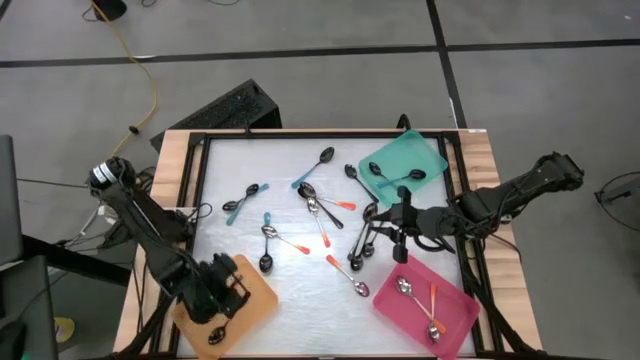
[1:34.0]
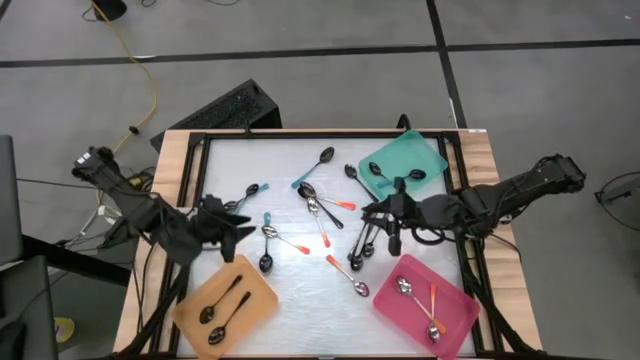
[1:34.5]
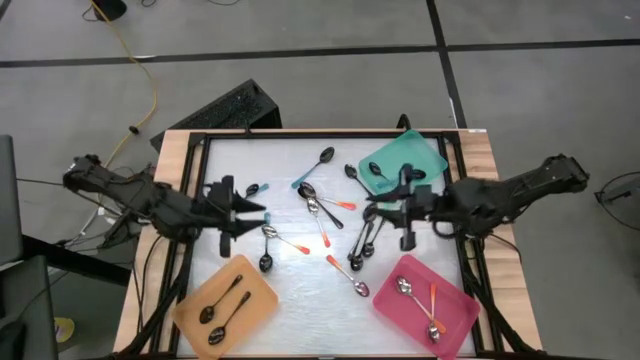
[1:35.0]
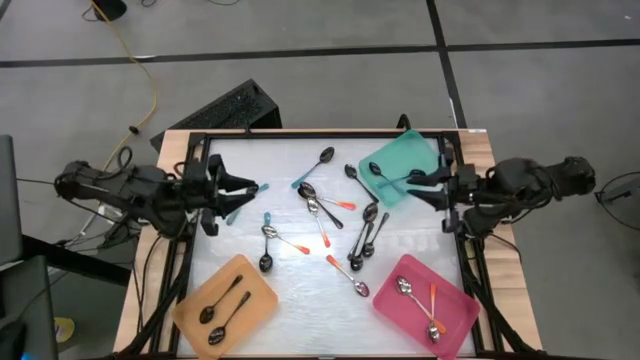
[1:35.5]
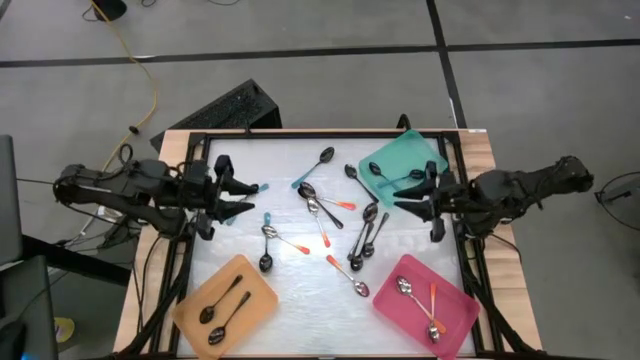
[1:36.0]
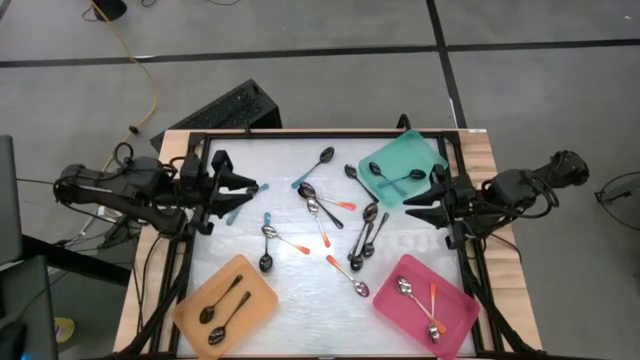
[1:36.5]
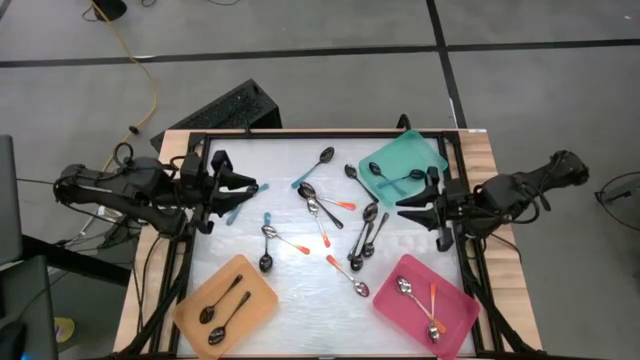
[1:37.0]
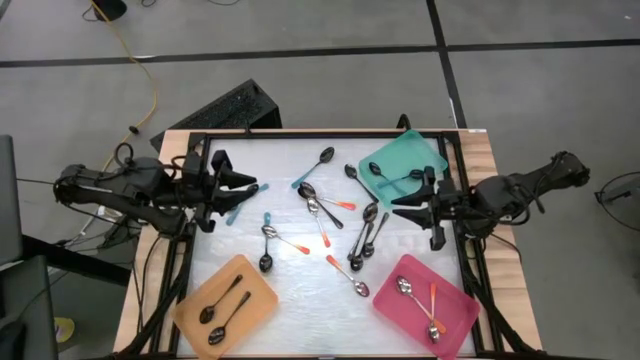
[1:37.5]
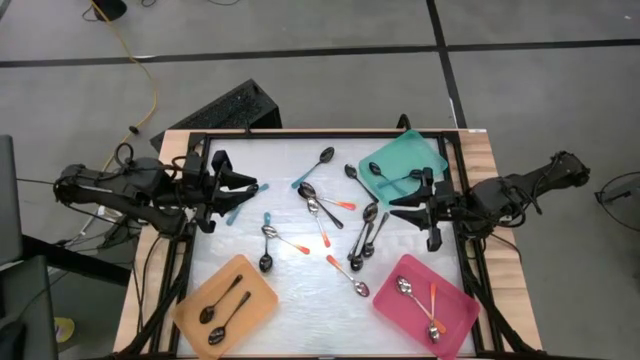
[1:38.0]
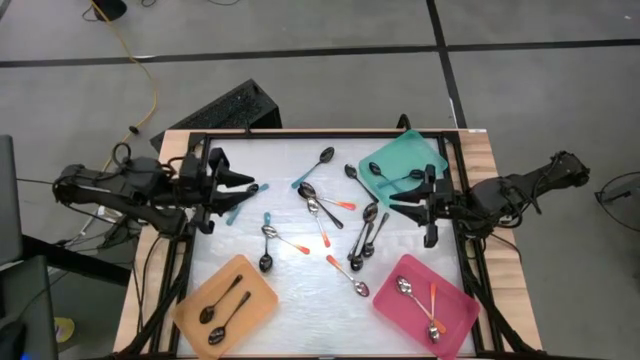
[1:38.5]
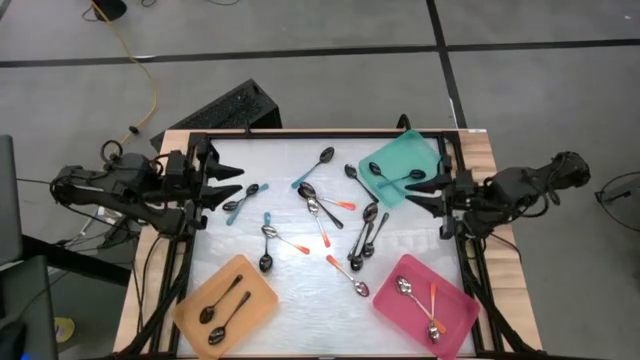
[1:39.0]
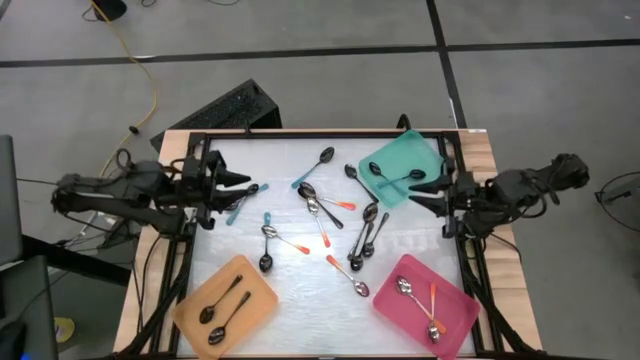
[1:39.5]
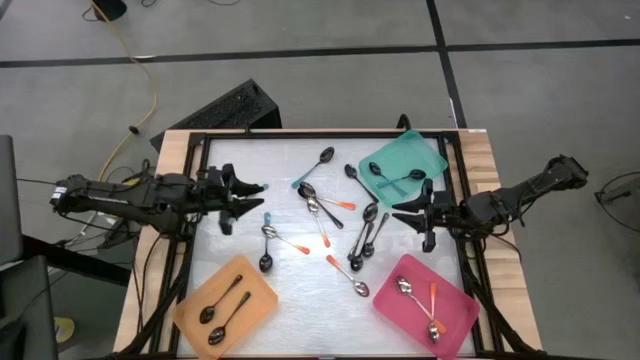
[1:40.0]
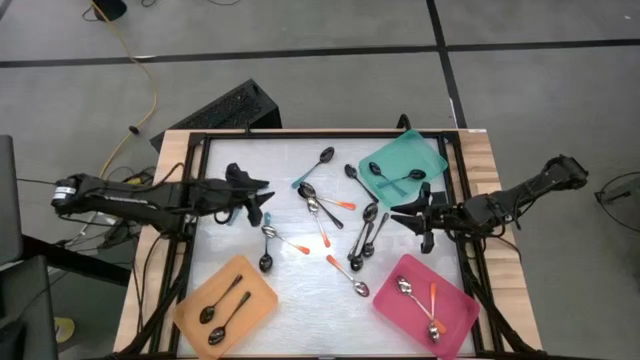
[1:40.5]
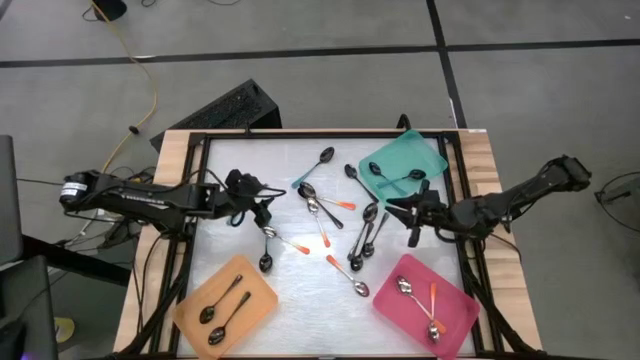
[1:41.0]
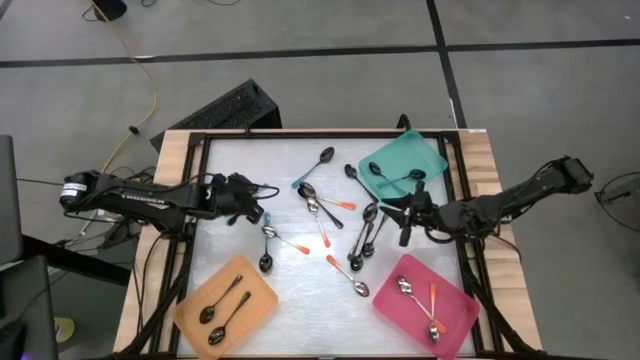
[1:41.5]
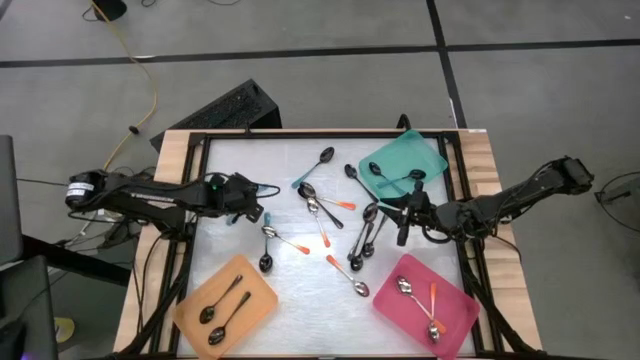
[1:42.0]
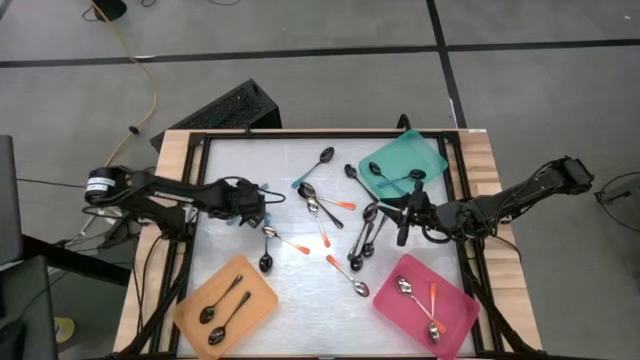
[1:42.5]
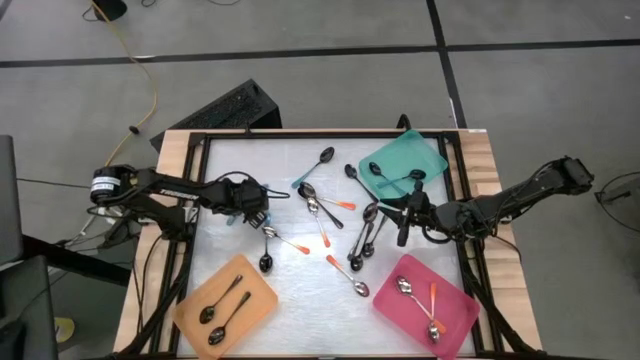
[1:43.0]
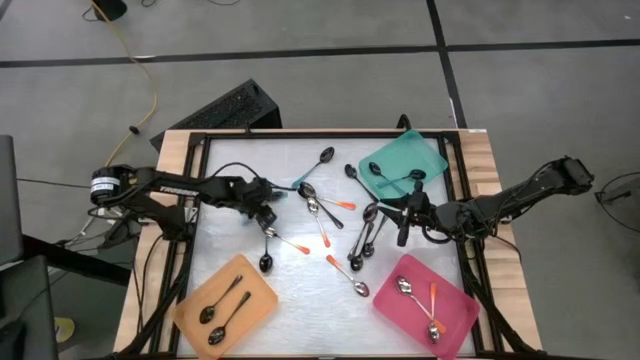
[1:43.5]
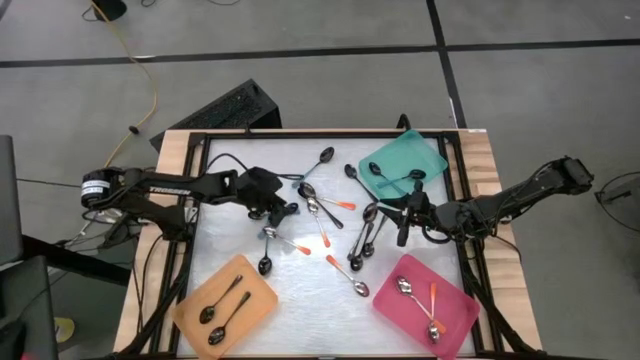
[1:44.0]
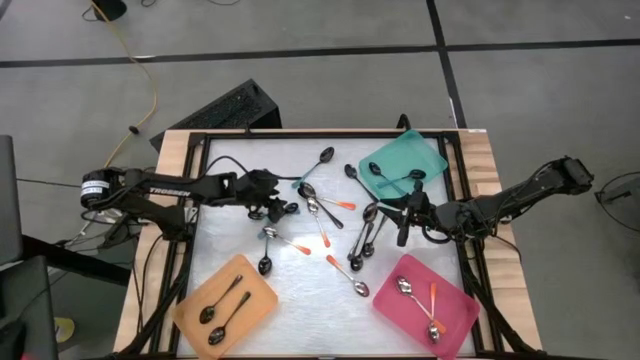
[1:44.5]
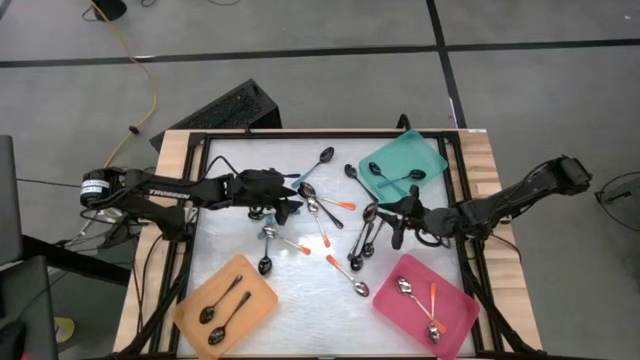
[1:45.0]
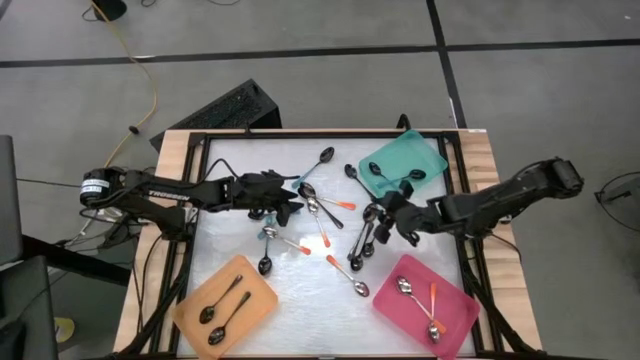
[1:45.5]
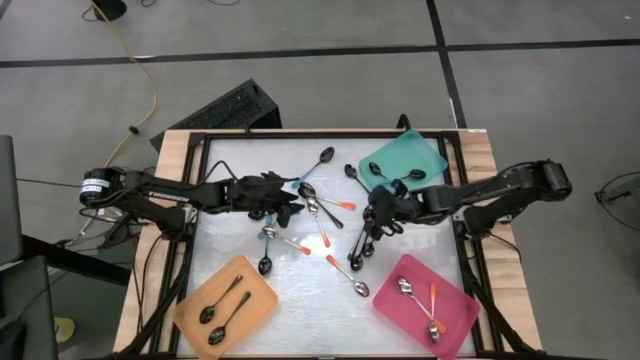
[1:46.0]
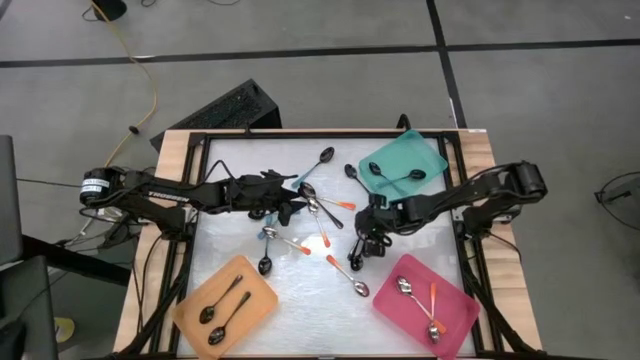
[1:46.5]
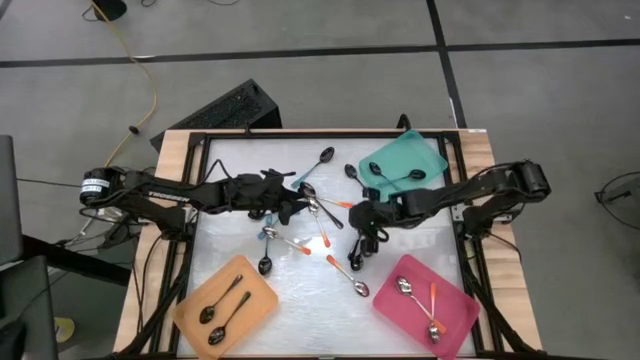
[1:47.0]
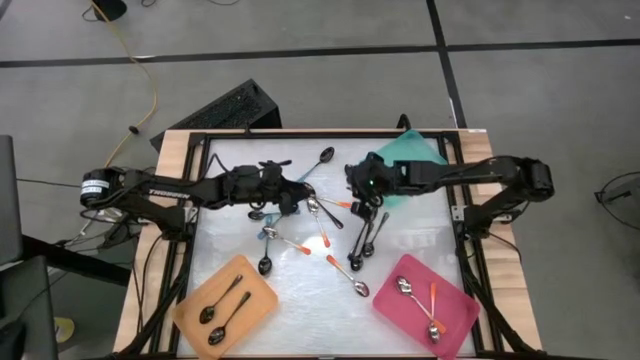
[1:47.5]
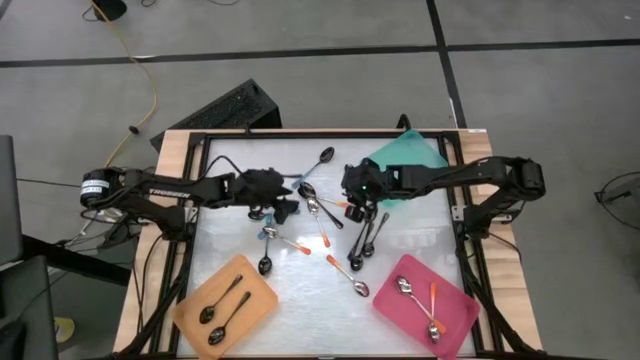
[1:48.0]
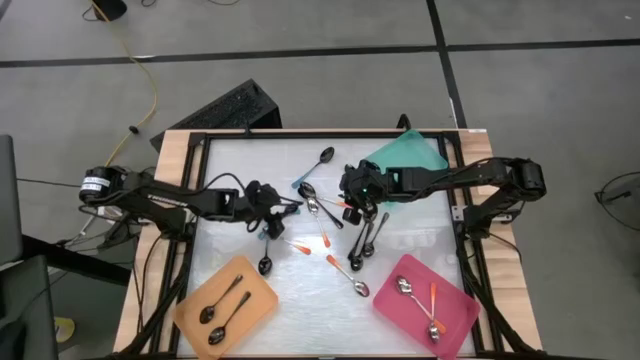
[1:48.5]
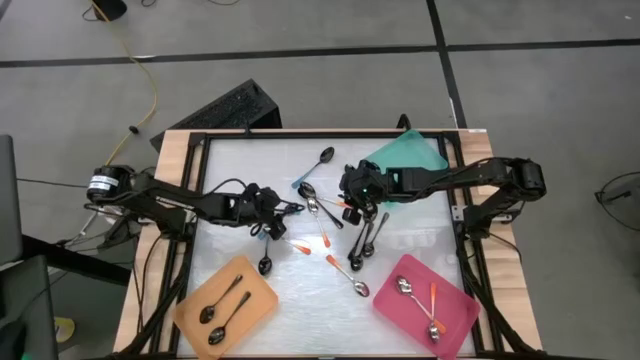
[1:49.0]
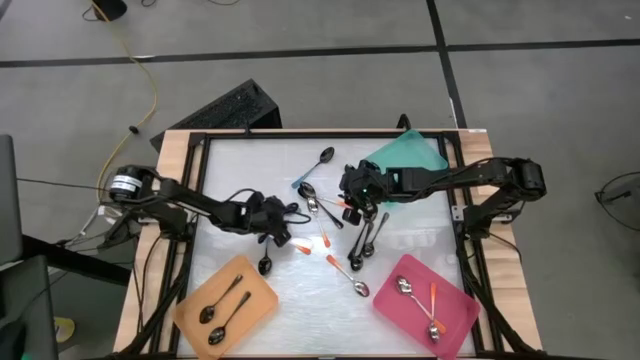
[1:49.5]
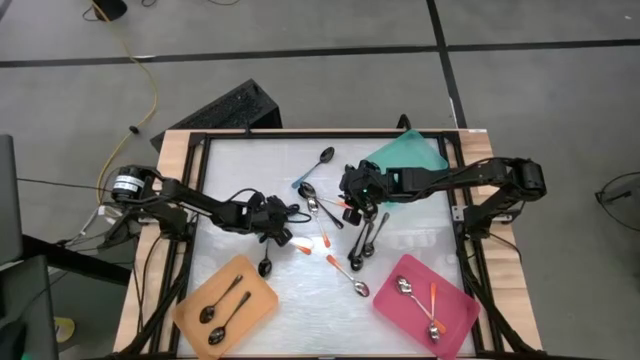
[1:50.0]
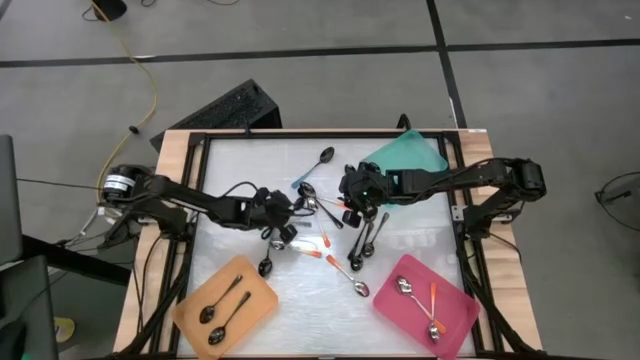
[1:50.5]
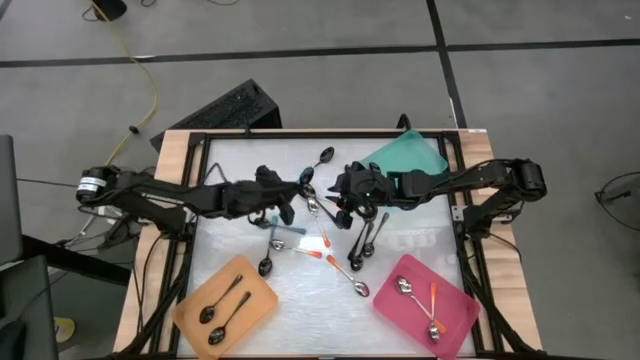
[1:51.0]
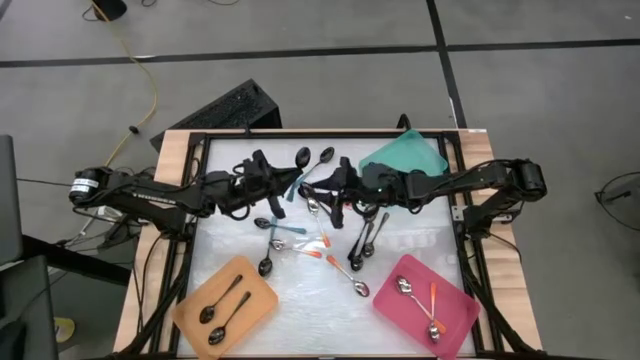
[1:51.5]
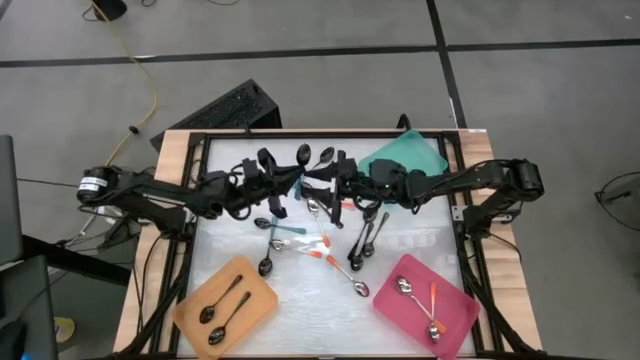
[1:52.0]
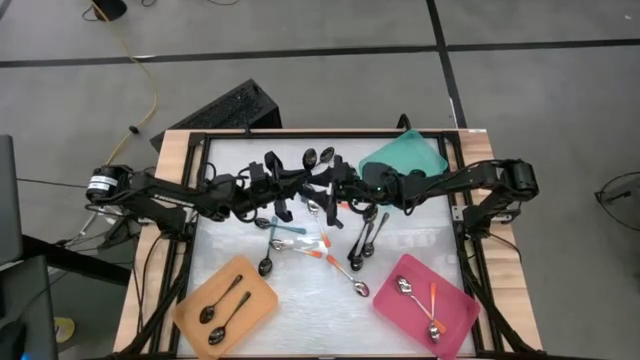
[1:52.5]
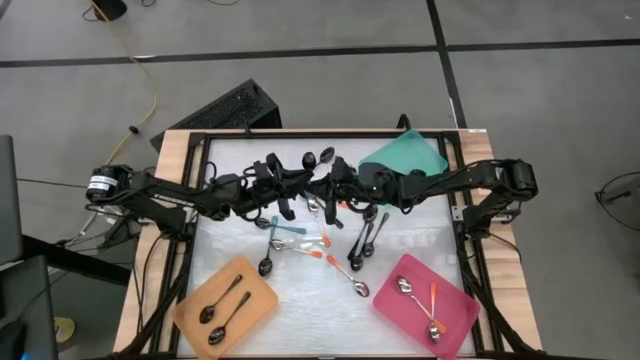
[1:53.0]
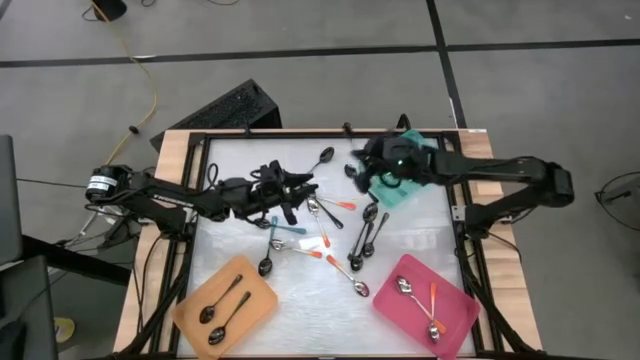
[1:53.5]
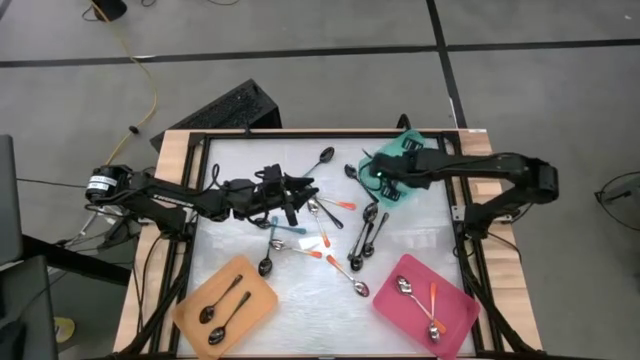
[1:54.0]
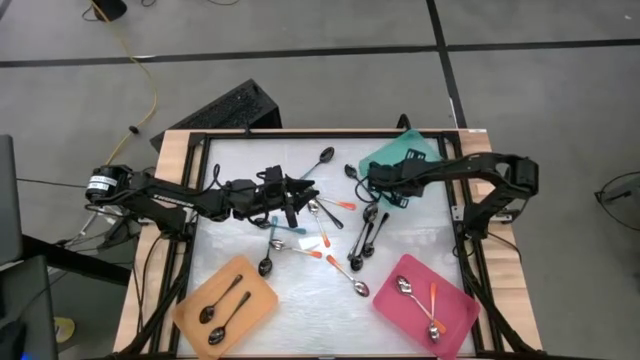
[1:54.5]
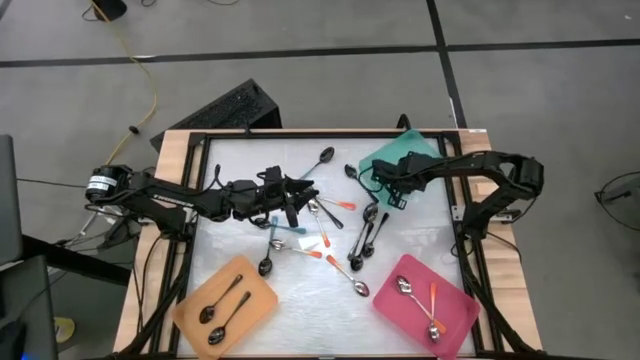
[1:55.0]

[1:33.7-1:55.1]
Task: Sort silverware by color (type)
Put the blue spoon into the blue bin
